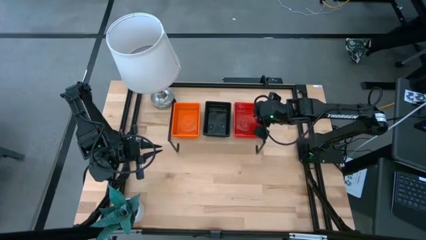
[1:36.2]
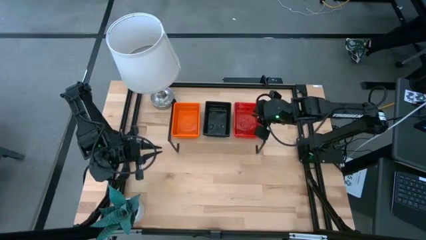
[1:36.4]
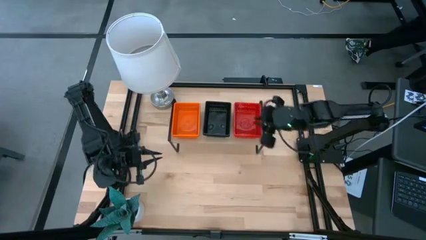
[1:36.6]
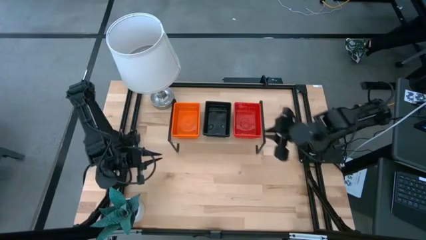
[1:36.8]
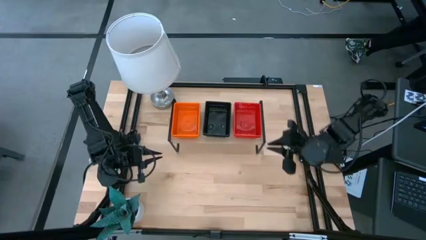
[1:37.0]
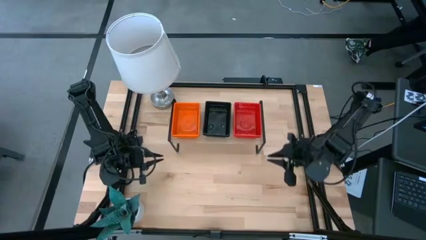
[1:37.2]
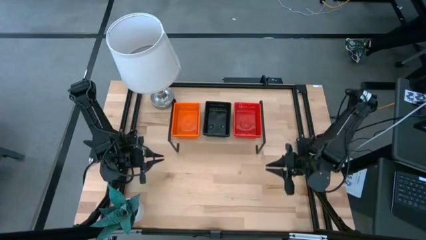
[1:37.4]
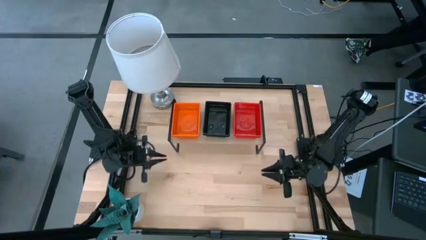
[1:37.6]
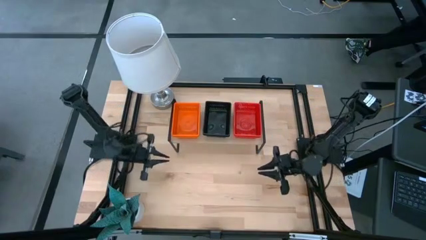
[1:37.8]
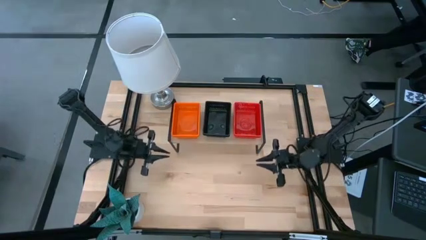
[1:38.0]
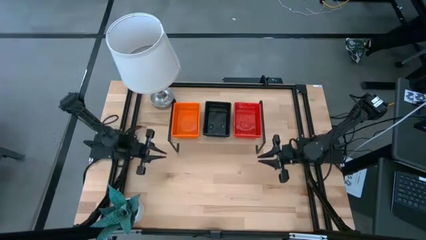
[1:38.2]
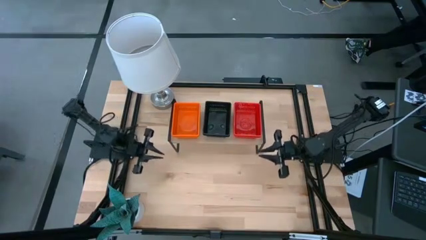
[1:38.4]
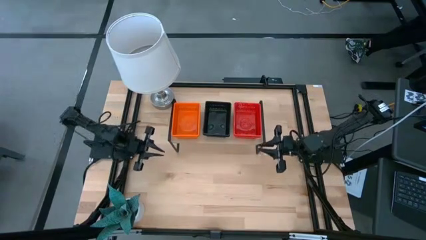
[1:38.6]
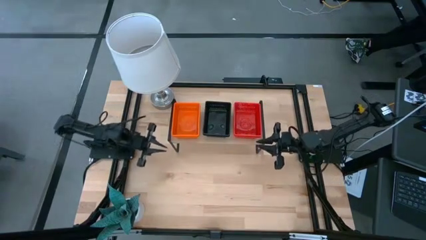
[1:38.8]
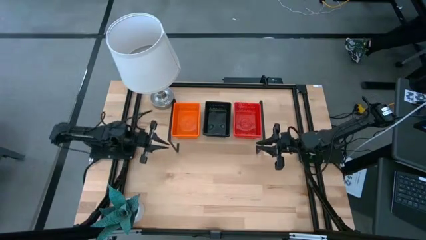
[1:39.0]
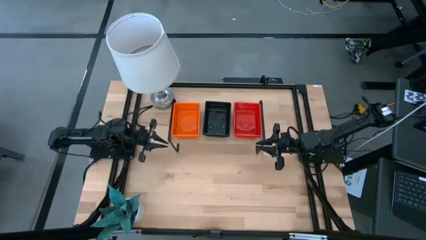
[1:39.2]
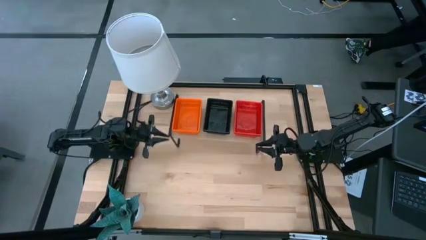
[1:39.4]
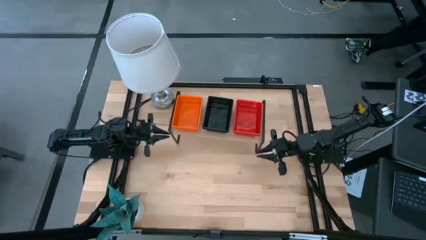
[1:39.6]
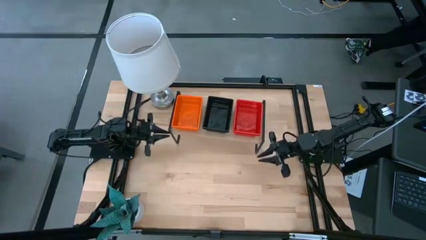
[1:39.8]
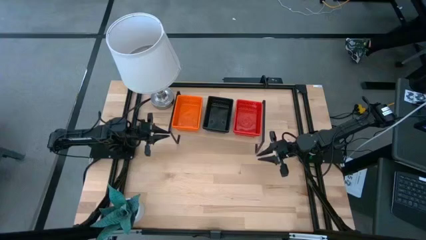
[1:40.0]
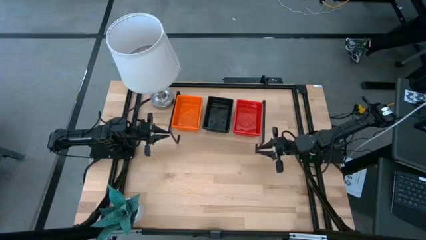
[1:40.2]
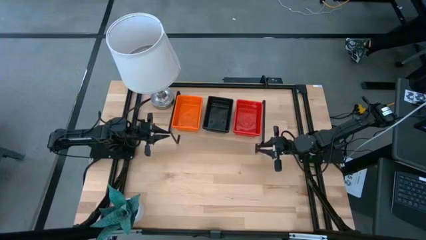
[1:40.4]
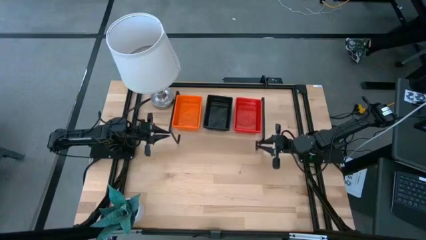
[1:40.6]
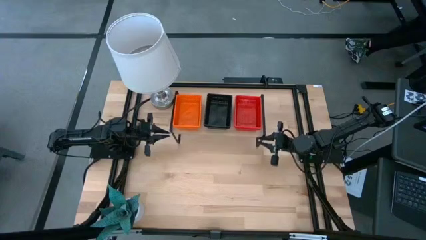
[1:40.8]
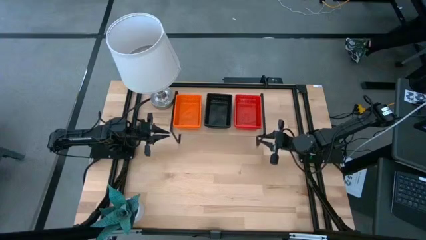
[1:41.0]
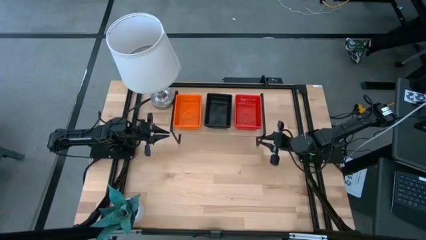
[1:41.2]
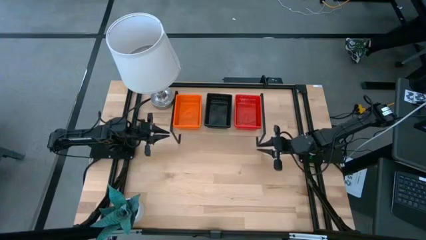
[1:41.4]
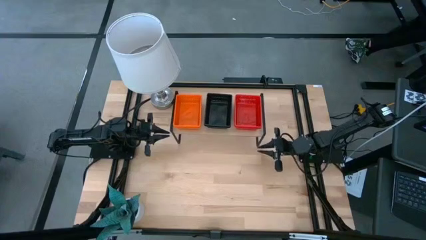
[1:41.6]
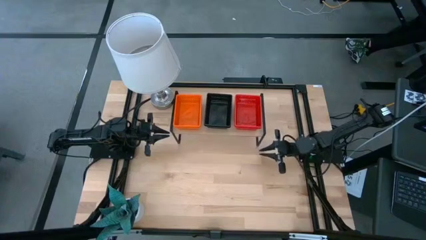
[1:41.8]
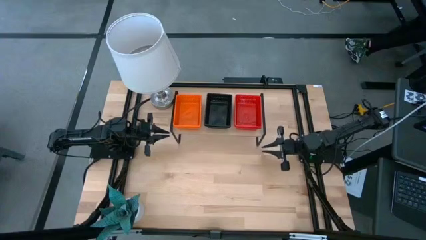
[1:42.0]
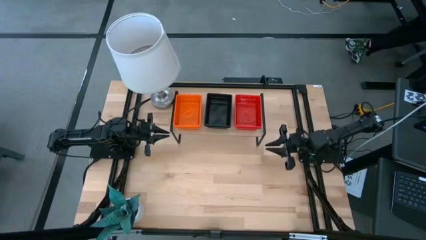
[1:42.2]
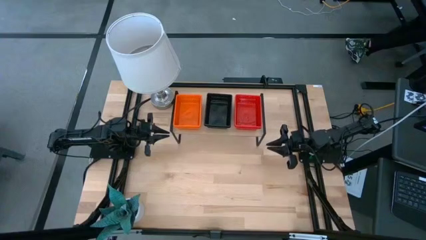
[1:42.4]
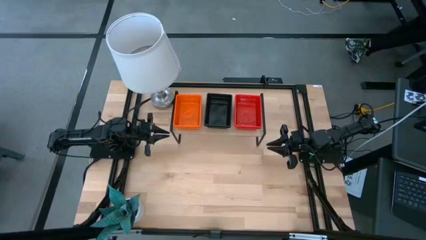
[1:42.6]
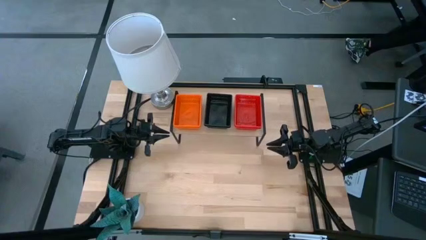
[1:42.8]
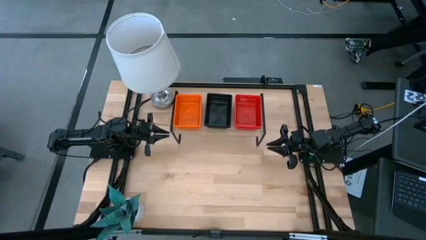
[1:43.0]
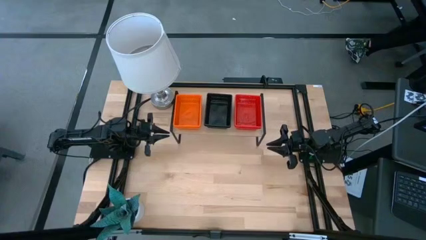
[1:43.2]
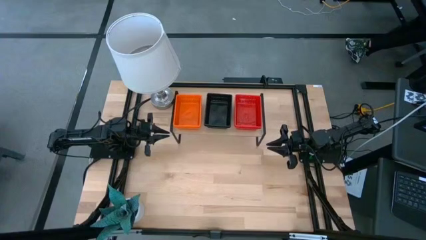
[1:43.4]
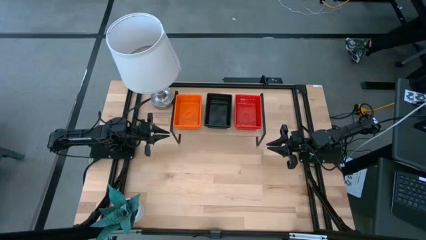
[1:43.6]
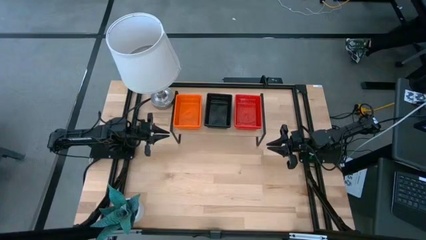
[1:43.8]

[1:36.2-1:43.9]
Task: Stack baskets on shelf by color
Return to Home Position

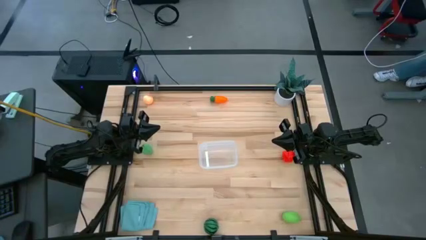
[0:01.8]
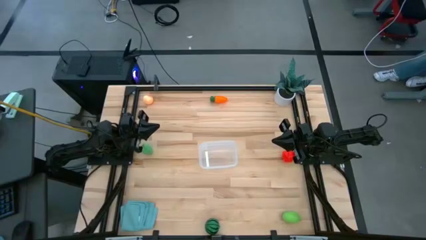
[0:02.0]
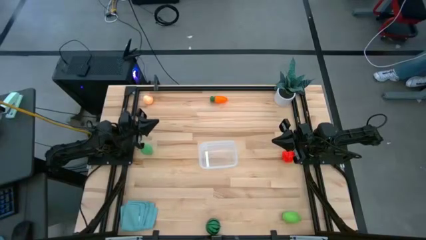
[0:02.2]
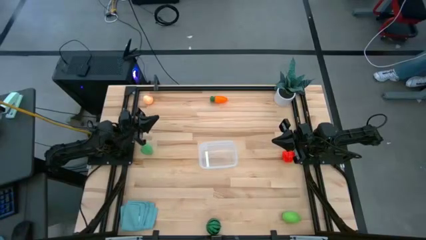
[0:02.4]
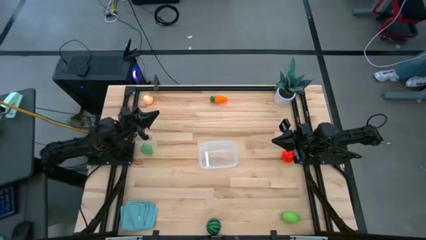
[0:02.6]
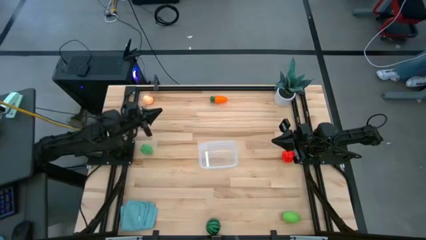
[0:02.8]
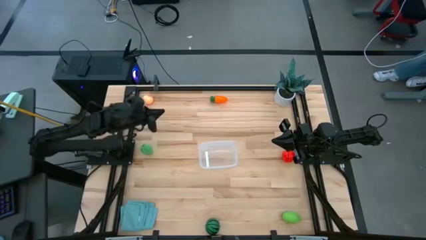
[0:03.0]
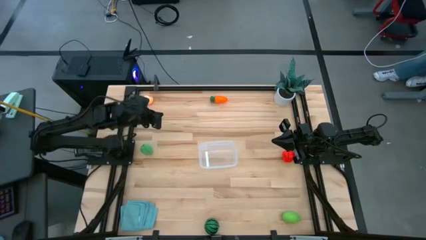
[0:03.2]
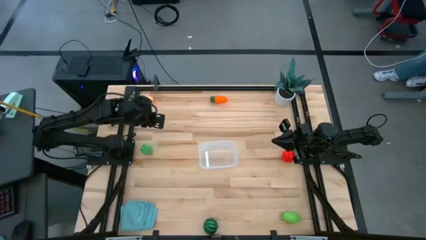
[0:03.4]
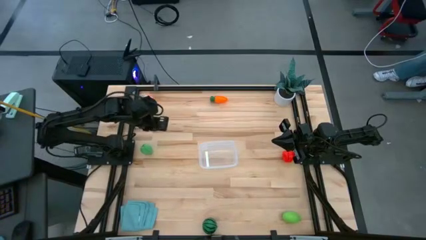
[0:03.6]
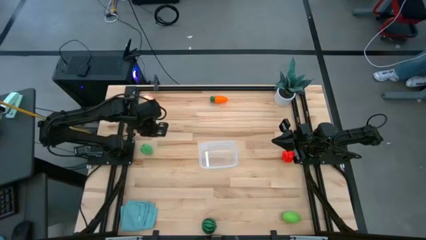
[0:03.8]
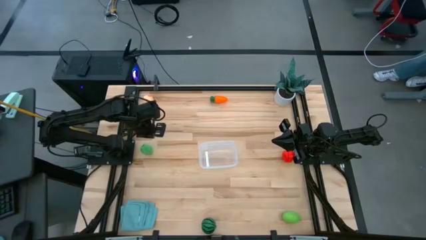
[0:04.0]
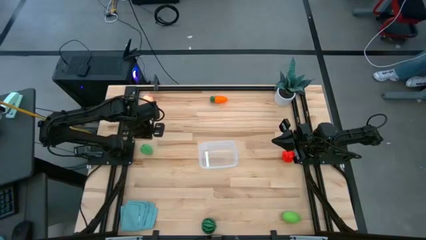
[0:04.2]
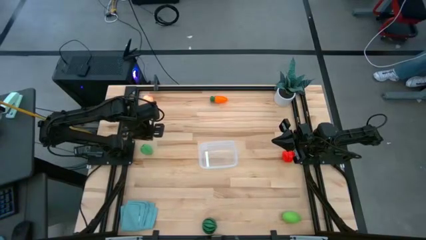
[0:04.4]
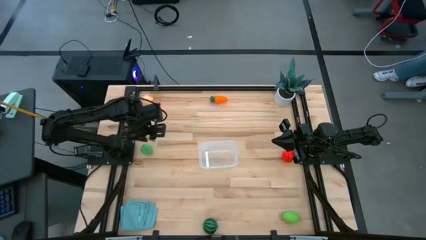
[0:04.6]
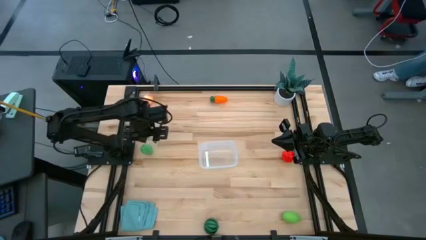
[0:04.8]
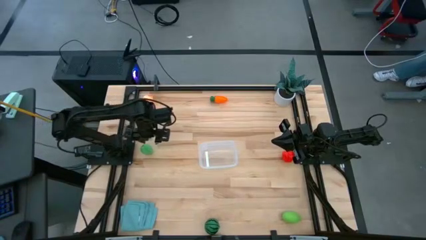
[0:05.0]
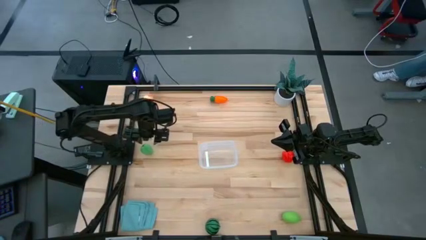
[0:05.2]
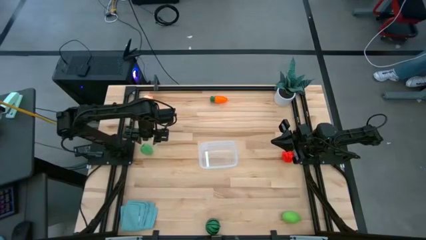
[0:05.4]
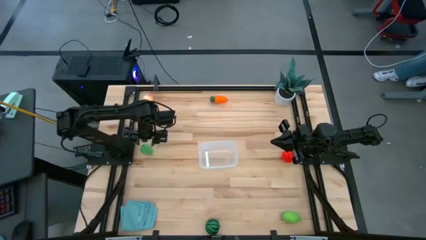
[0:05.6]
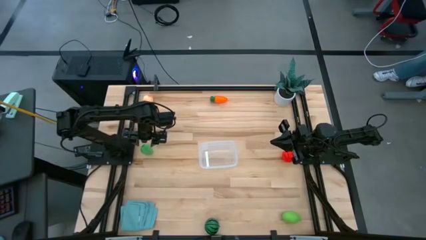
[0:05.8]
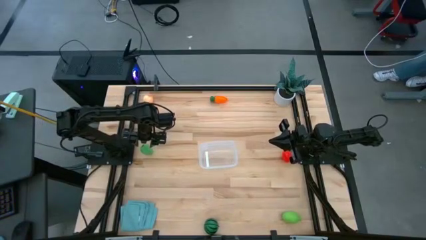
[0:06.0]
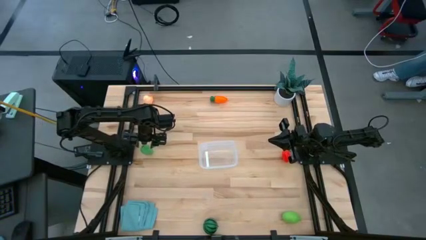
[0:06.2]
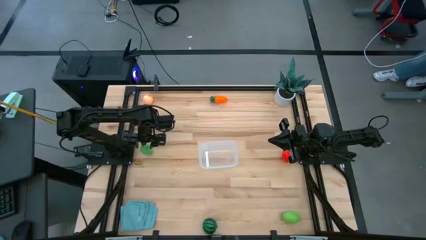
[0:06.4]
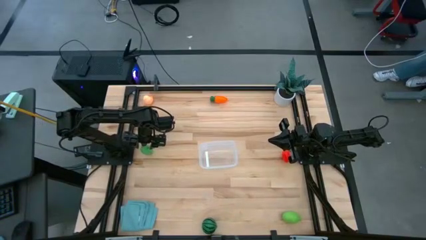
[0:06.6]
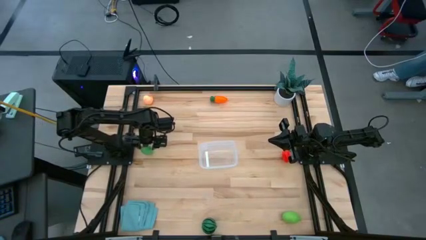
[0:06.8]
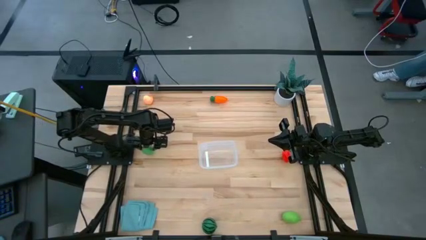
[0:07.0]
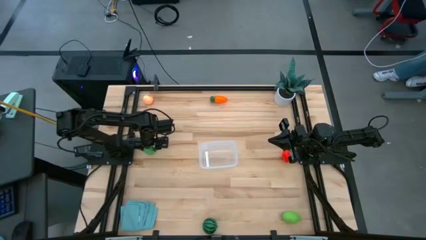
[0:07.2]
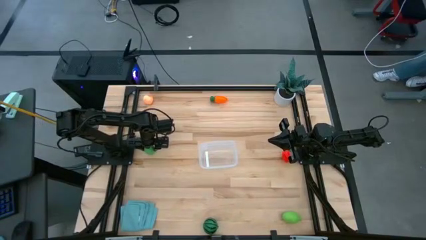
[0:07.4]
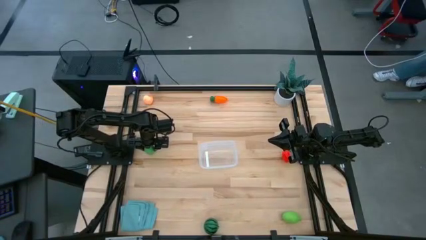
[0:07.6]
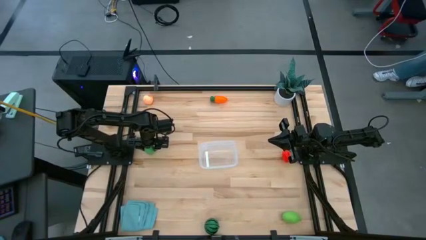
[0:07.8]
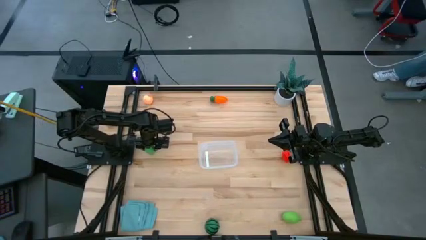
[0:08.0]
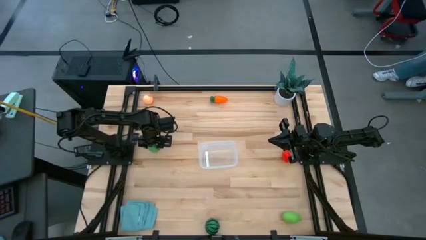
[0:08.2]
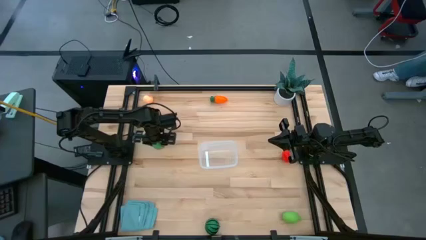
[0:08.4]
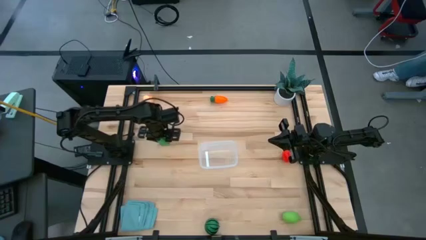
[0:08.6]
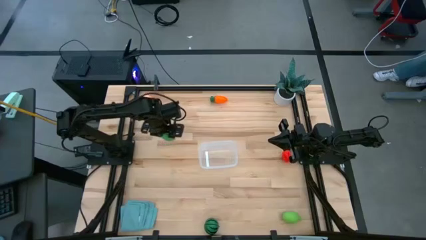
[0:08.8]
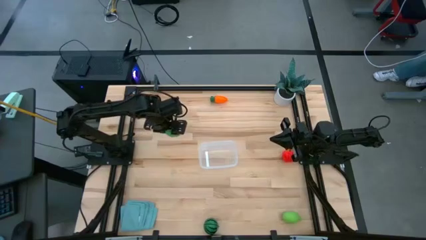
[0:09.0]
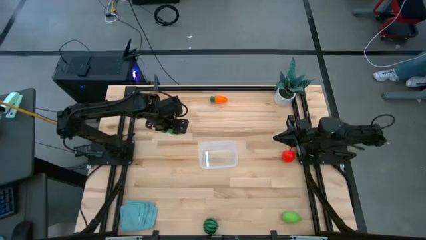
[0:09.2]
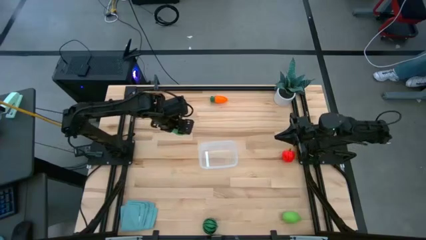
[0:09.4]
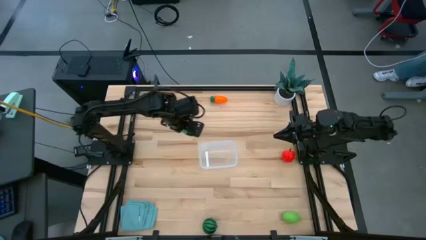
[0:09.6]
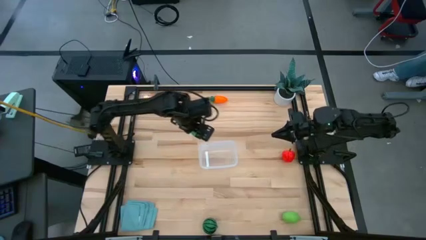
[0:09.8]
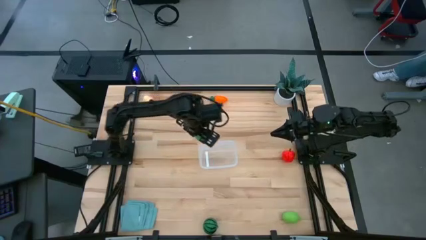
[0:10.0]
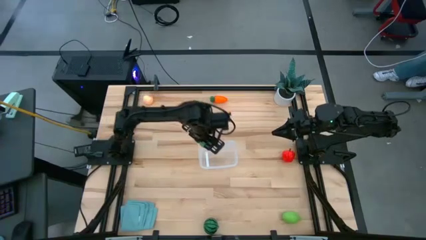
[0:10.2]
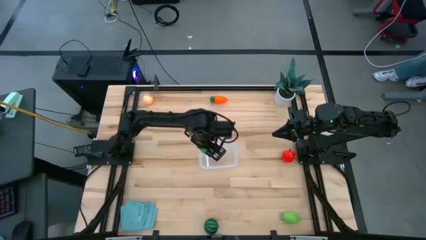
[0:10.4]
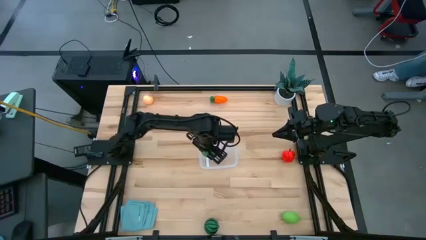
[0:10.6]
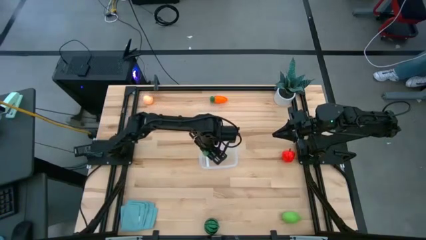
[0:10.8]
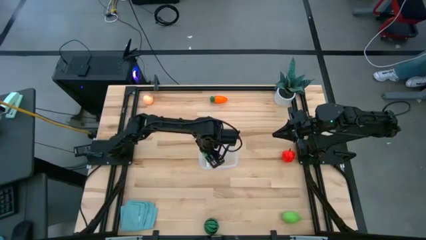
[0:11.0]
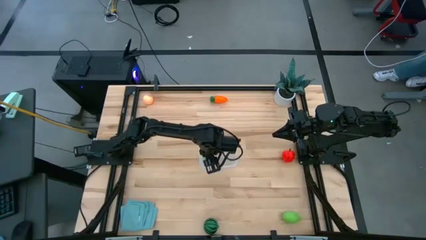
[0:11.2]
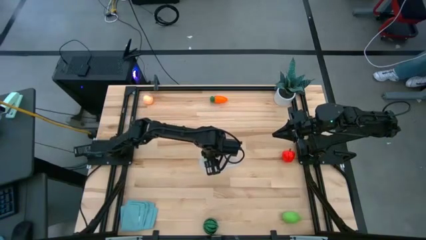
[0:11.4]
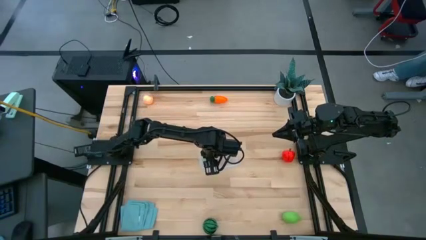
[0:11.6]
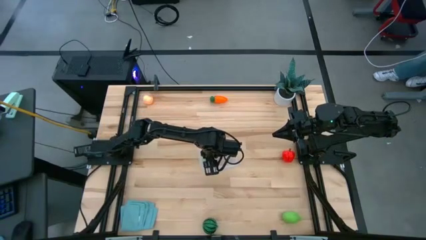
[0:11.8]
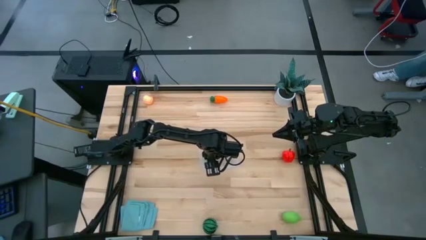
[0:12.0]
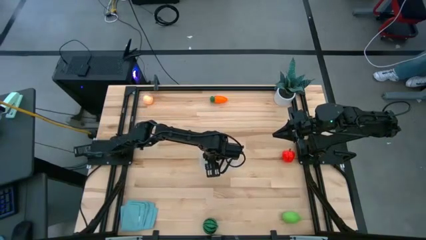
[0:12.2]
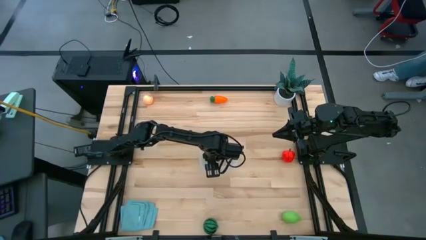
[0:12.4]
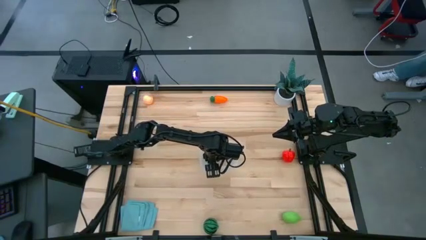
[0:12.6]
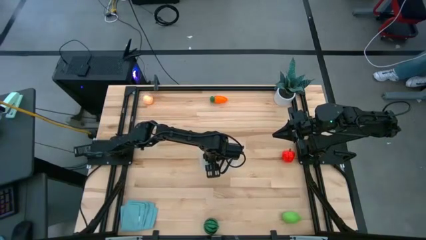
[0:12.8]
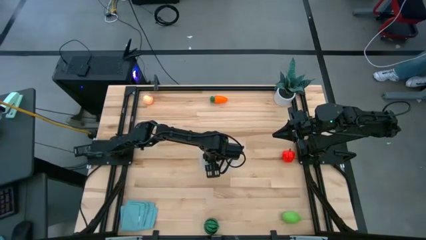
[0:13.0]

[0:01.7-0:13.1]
Task: Pick and placing Produce into tupperware
Put the green corn into the transparent bin
